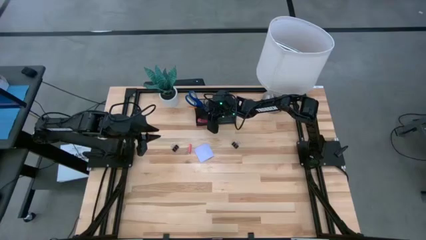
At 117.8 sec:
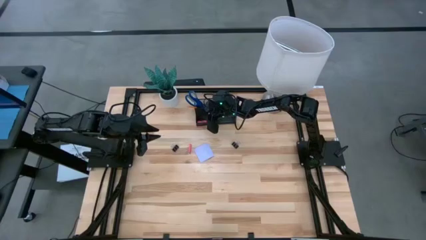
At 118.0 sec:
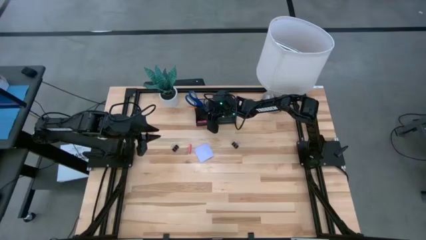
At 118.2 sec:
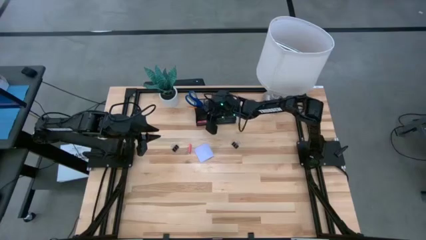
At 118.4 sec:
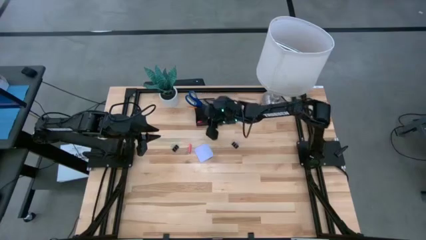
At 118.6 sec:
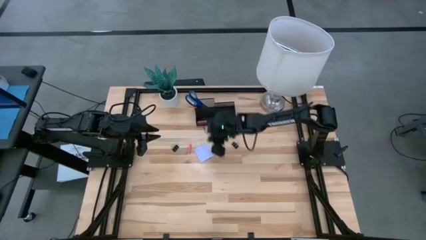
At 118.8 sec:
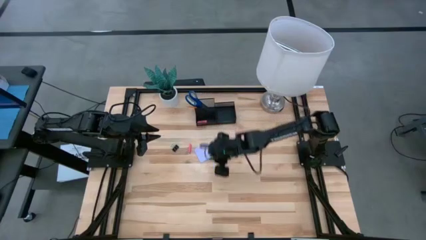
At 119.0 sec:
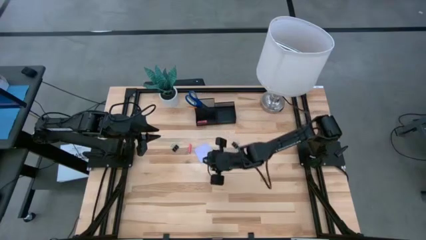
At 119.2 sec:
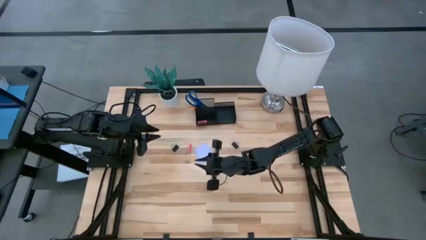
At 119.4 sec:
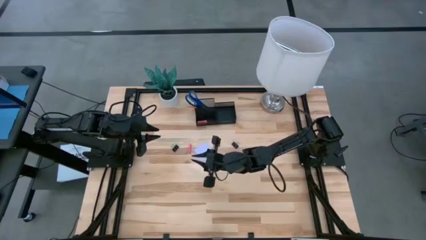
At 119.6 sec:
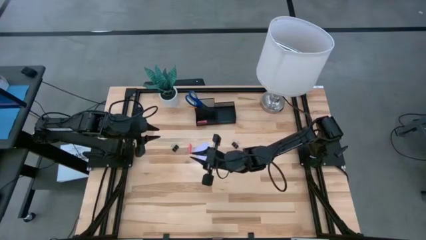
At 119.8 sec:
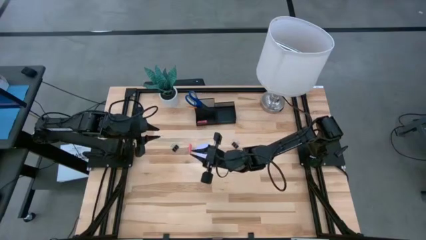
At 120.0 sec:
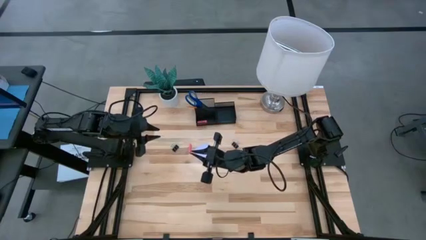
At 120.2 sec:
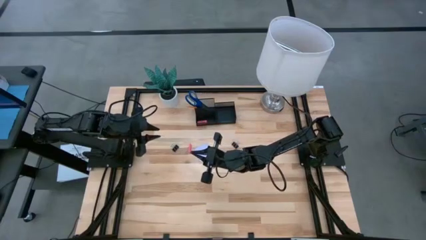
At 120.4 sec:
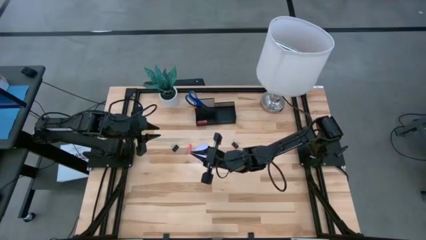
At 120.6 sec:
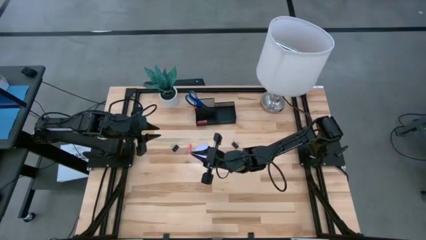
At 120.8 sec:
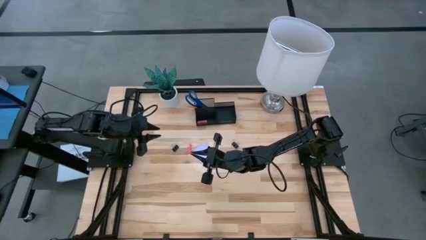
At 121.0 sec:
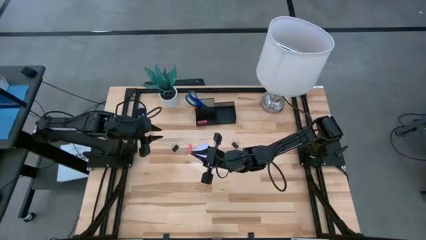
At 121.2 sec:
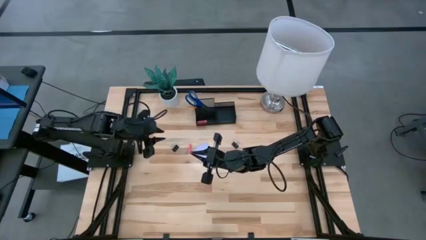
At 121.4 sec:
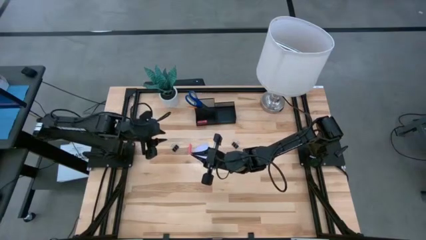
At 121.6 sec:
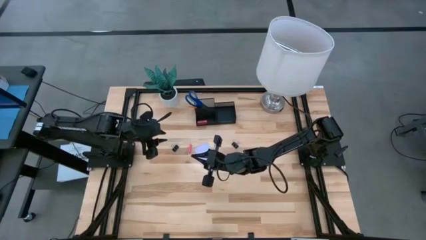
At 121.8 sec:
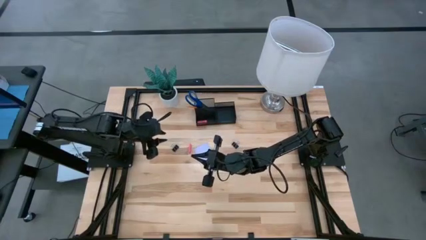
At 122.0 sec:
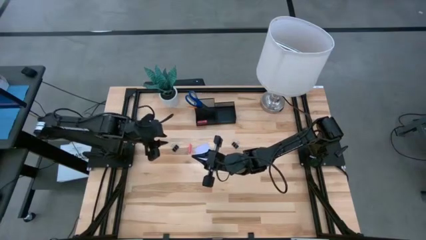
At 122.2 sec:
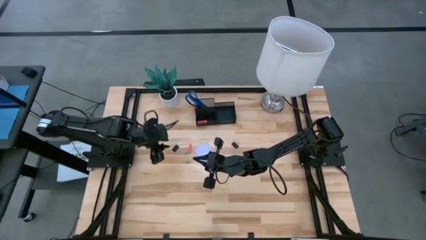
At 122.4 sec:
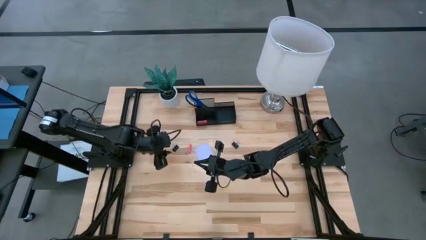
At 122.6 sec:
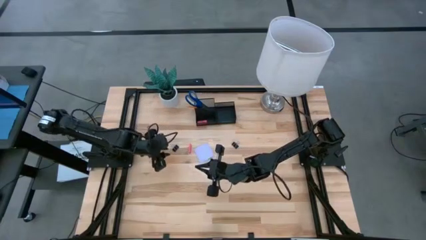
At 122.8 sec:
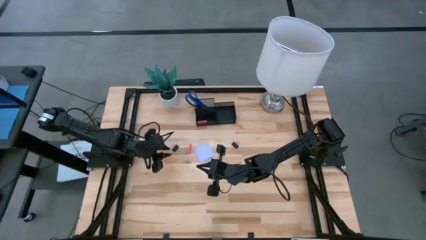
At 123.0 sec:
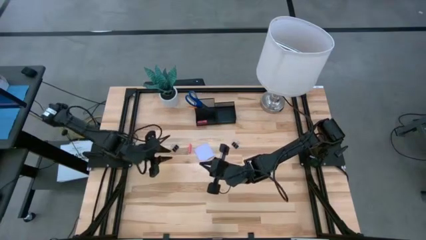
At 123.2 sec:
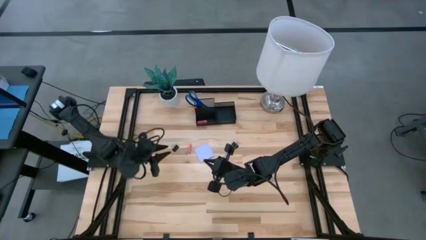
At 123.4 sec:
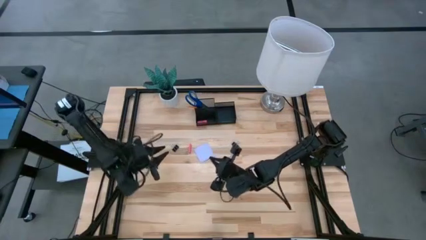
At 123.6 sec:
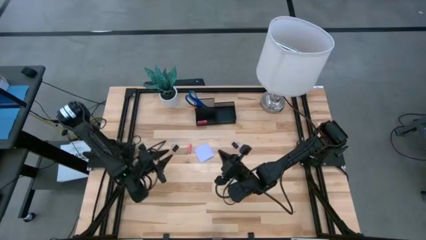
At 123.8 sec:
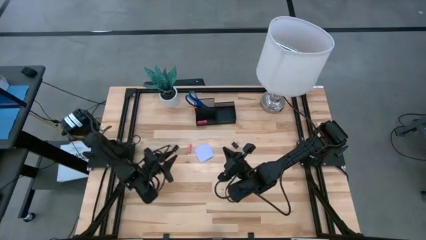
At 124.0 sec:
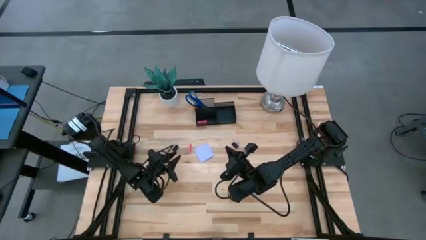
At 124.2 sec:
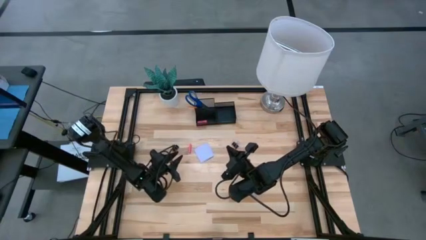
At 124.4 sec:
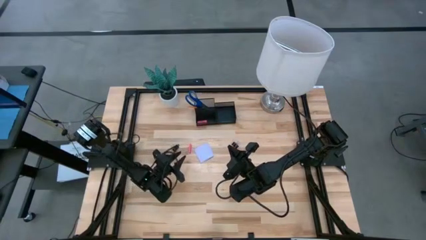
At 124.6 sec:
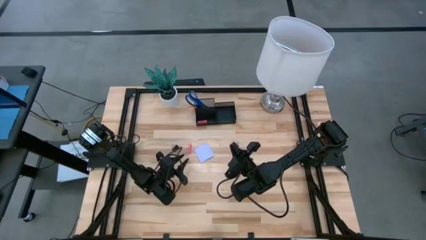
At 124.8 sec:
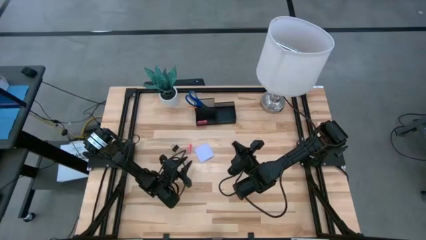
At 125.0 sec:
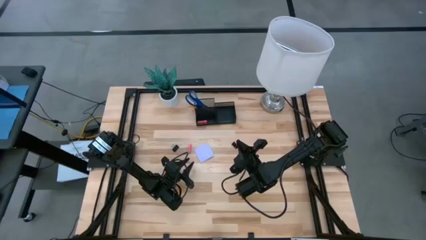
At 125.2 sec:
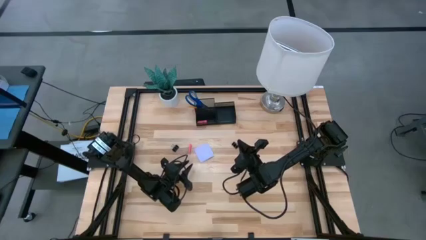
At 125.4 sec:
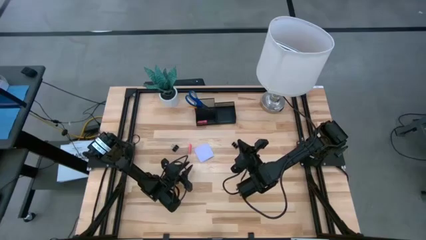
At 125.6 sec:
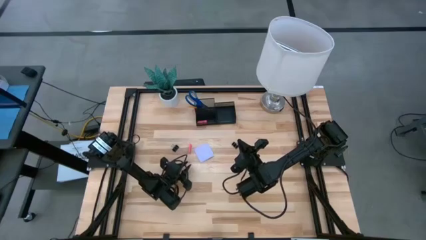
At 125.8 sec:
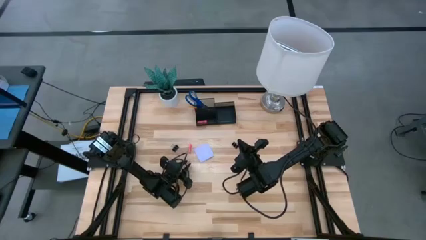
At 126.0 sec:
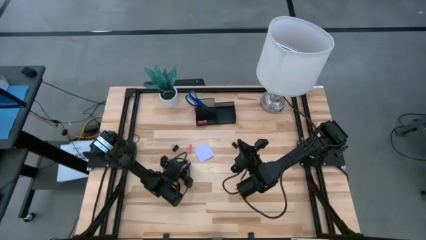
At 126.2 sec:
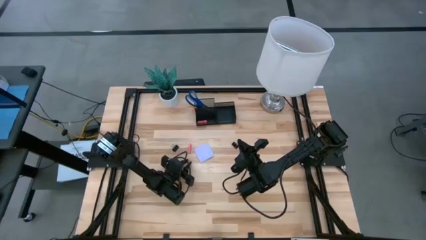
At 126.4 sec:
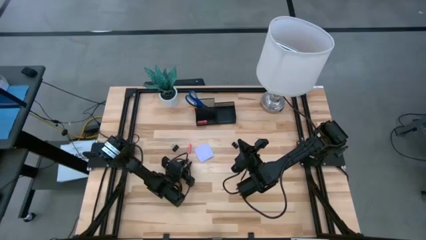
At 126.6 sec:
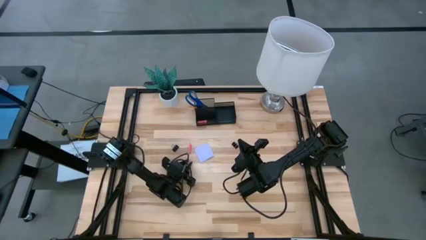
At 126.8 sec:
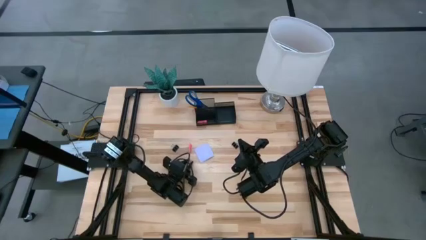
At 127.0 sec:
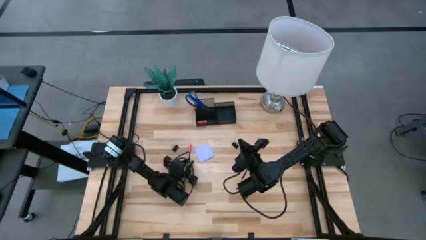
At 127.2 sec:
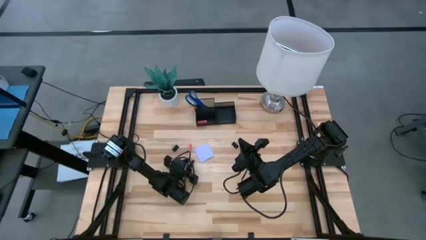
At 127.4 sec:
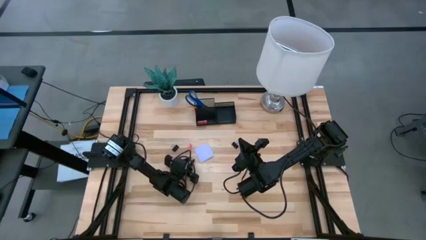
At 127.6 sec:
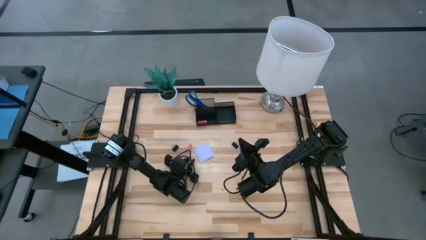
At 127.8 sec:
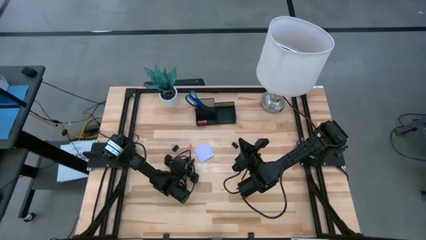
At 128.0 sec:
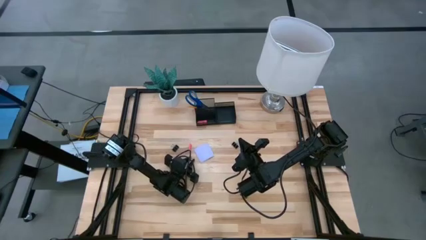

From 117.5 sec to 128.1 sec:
Task: Pick and place office supplies into organizer
Put the eraser into the desk organizer

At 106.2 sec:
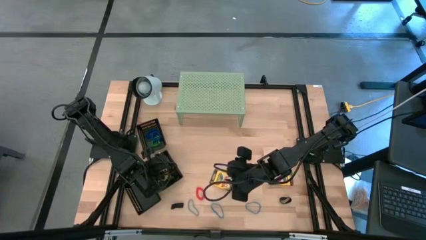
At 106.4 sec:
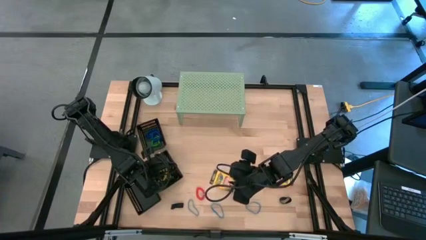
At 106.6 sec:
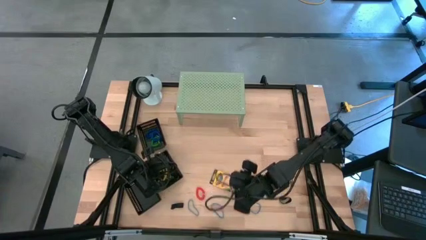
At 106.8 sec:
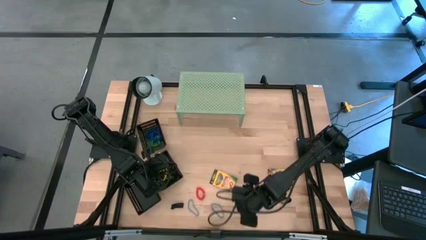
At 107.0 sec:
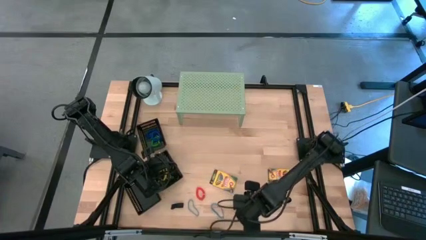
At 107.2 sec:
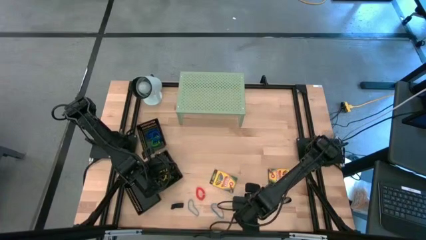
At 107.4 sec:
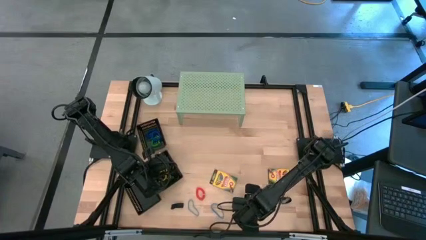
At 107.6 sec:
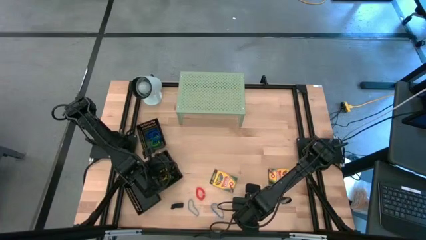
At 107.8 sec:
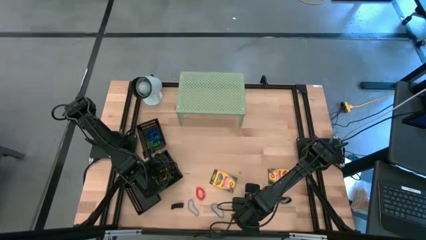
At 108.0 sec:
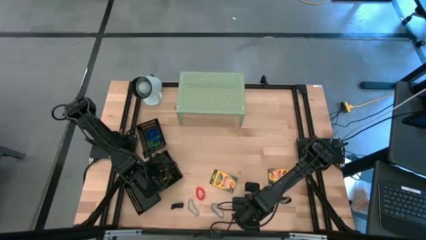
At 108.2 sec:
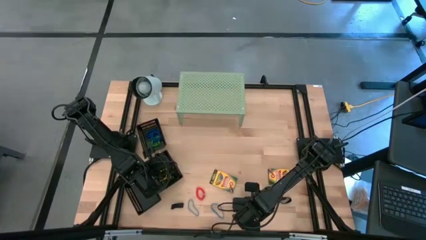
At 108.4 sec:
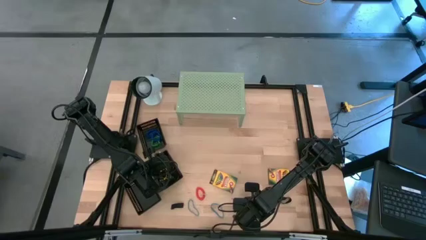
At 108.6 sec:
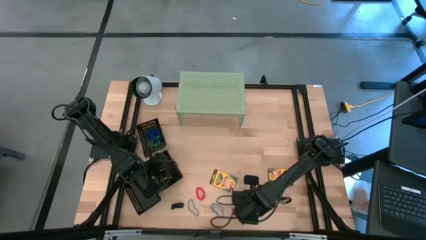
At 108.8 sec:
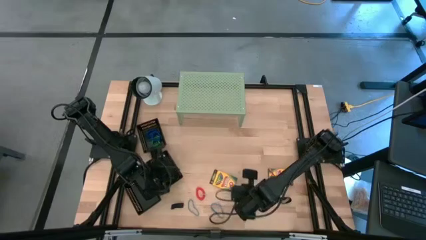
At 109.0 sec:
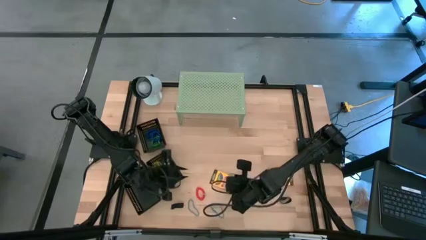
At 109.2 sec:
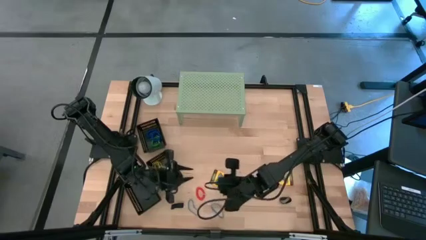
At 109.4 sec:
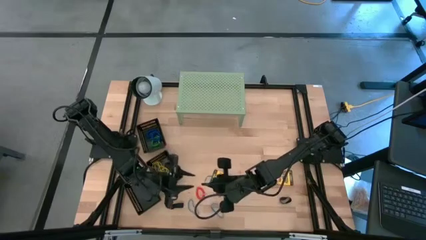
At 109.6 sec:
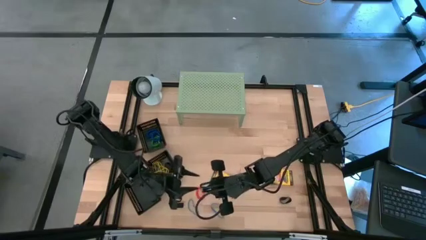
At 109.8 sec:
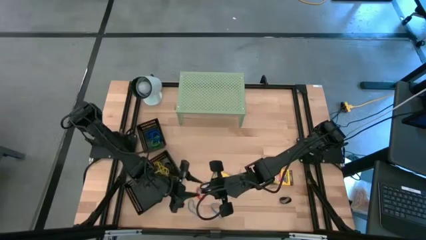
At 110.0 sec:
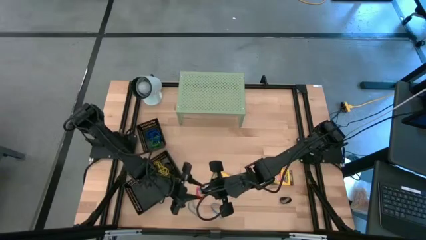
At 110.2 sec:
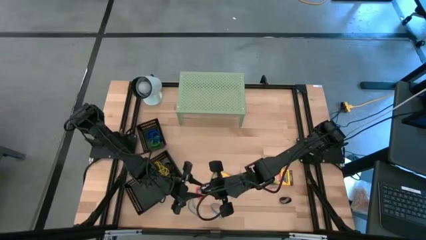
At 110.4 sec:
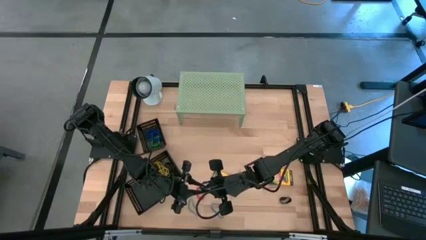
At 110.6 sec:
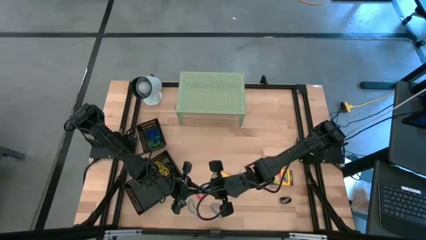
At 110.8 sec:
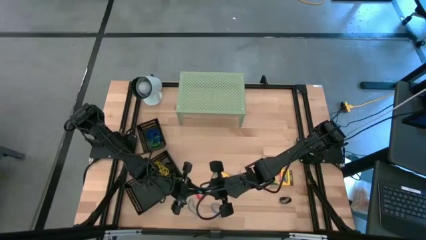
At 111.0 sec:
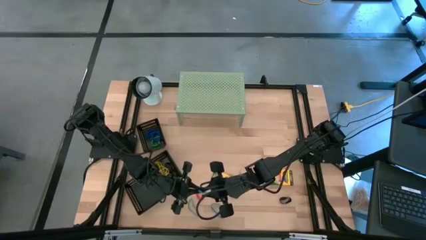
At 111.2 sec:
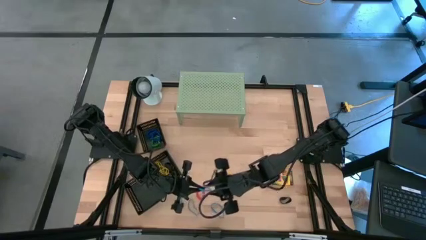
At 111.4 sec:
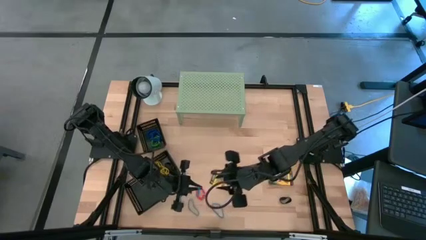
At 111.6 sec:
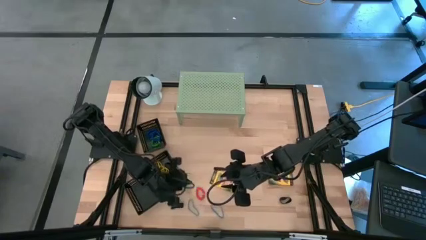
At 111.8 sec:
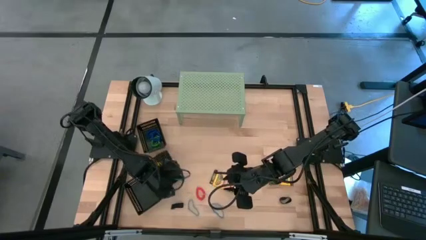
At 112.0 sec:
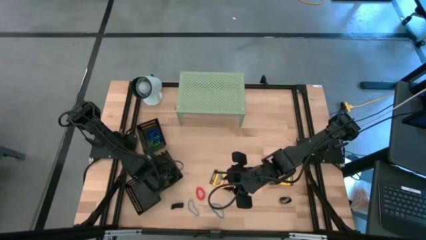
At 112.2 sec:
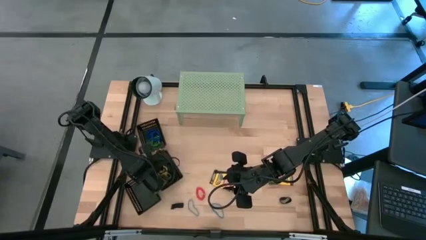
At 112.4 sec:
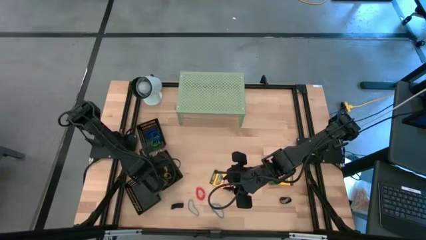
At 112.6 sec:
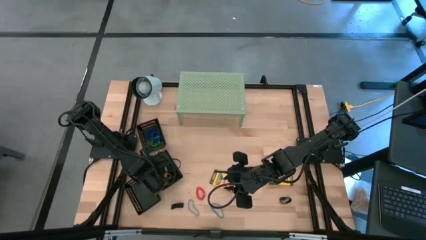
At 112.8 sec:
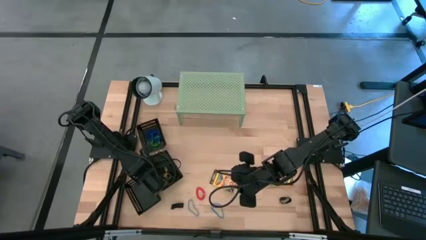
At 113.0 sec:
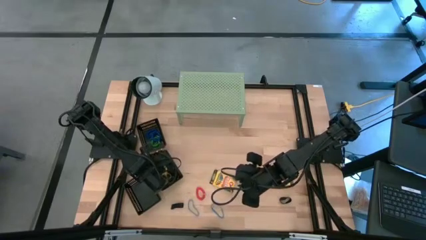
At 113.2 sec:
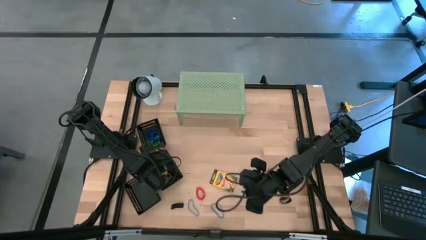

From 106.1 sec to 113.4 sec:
Task: Pick & Place Office Desk Supplies
Put the blue rubber band into the middle black bin
